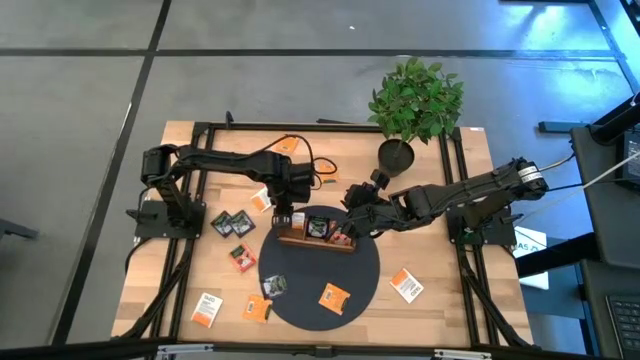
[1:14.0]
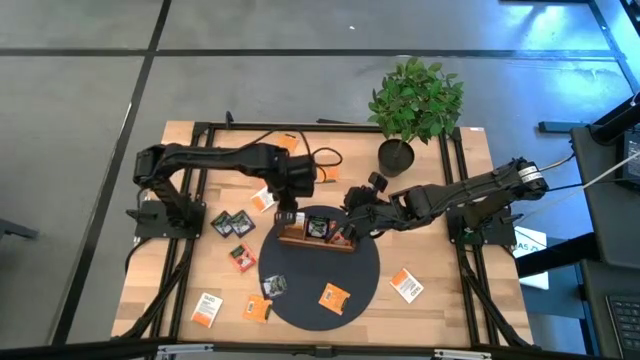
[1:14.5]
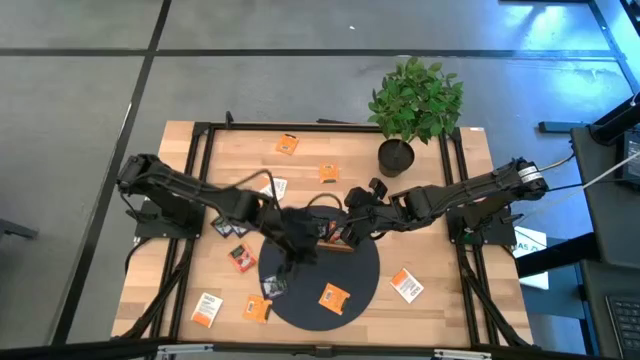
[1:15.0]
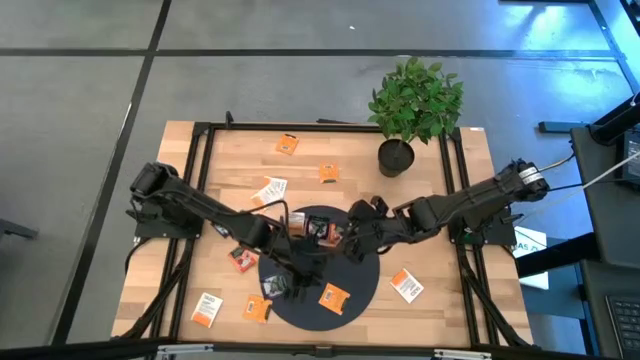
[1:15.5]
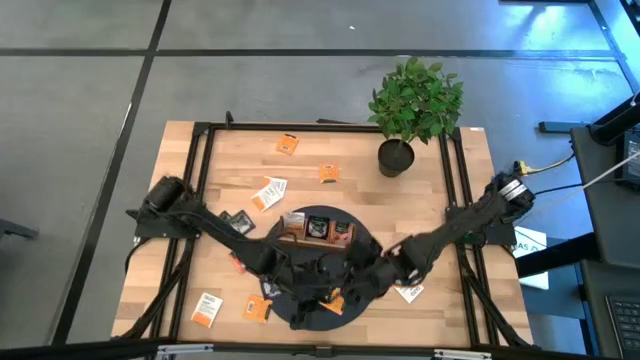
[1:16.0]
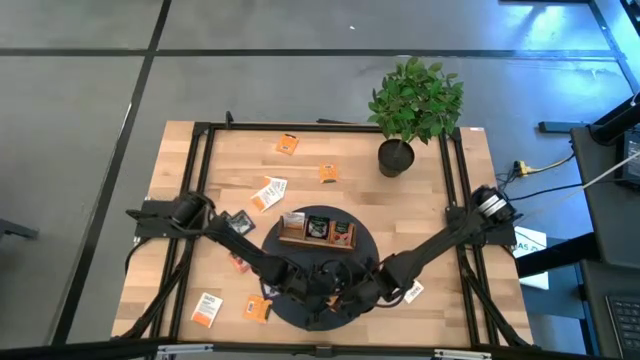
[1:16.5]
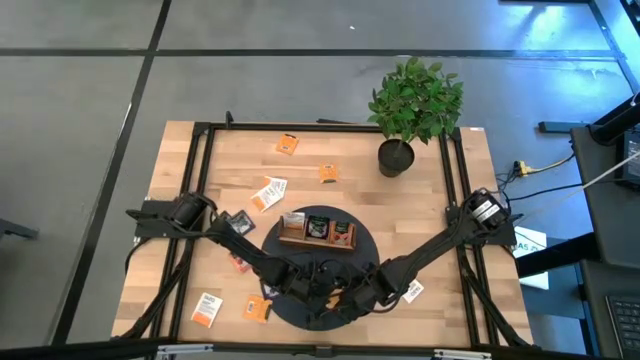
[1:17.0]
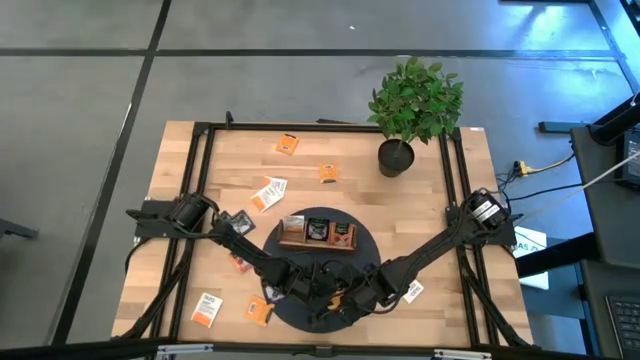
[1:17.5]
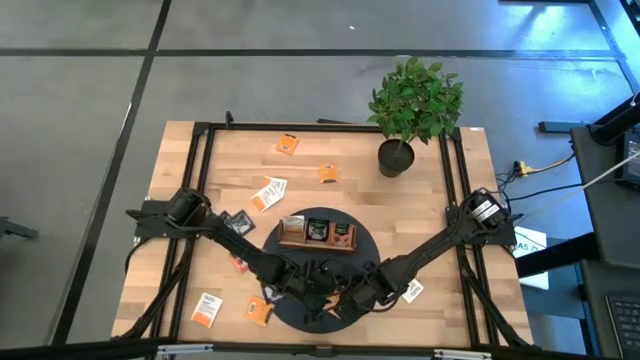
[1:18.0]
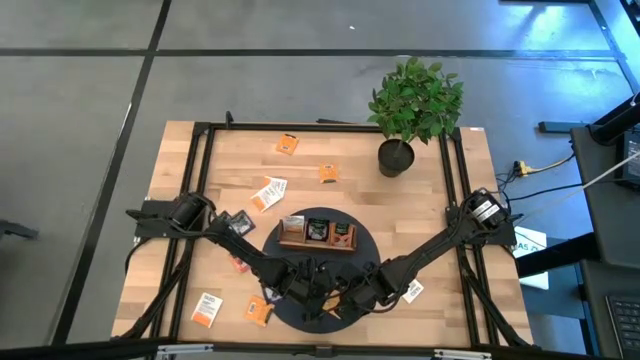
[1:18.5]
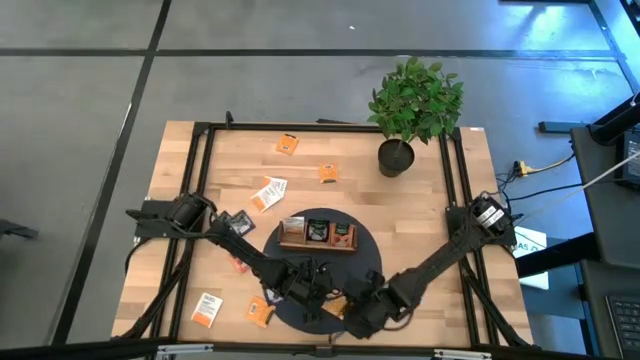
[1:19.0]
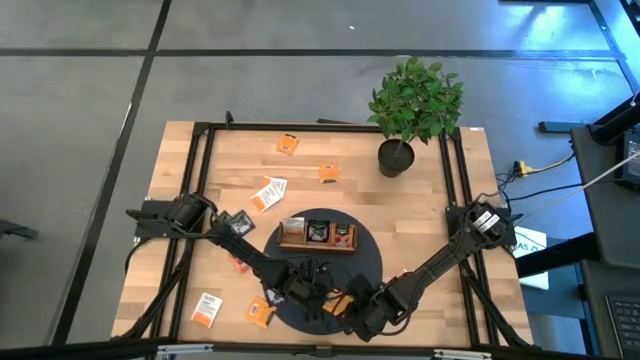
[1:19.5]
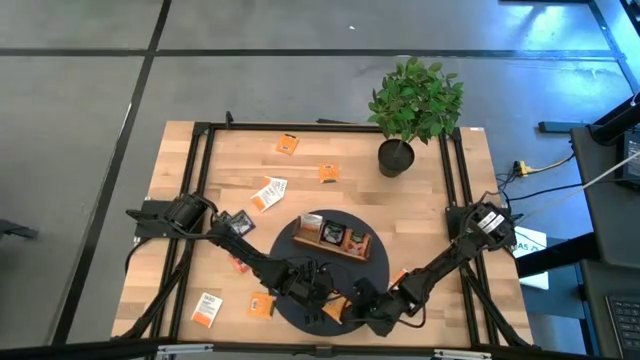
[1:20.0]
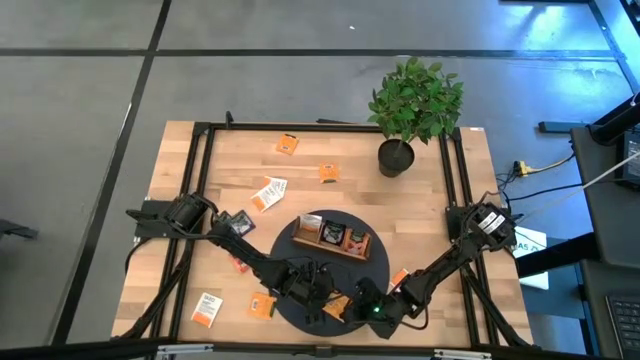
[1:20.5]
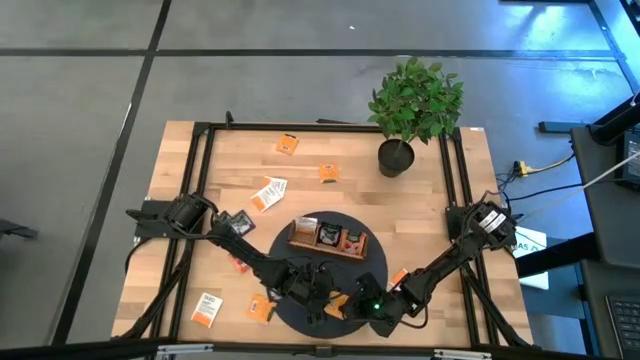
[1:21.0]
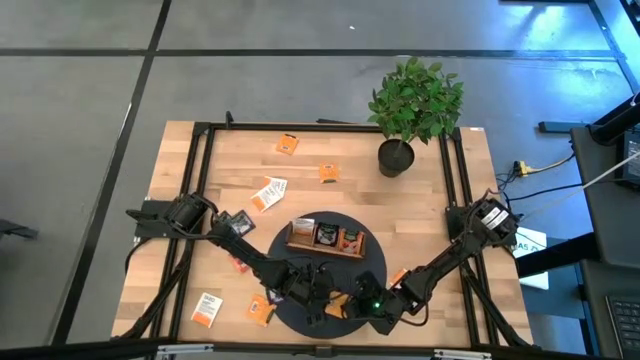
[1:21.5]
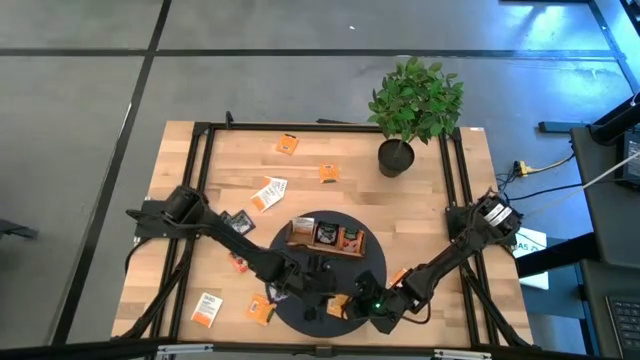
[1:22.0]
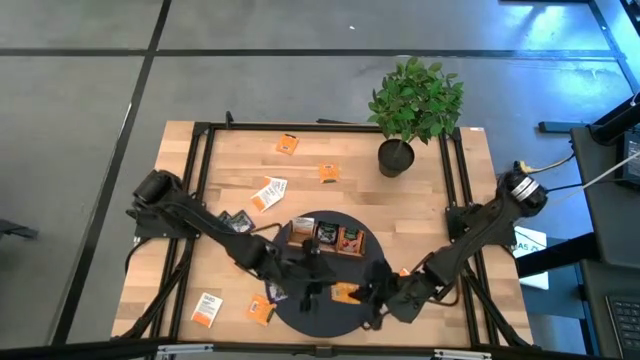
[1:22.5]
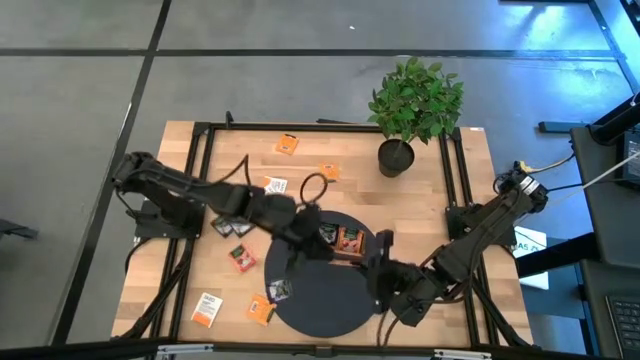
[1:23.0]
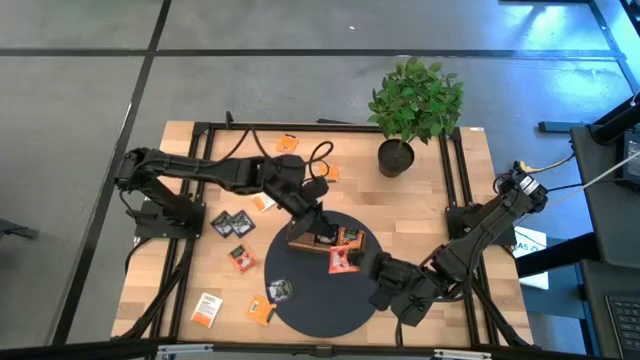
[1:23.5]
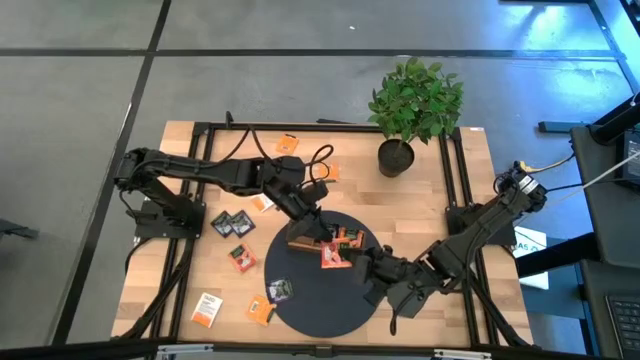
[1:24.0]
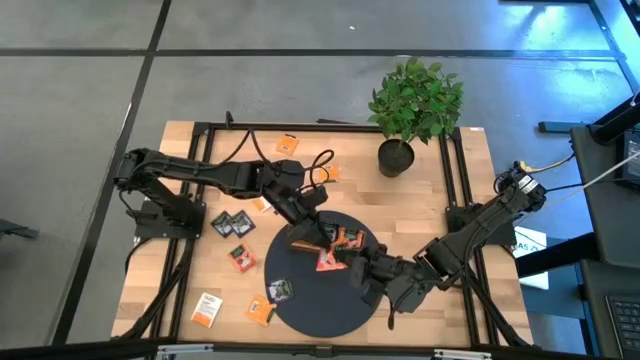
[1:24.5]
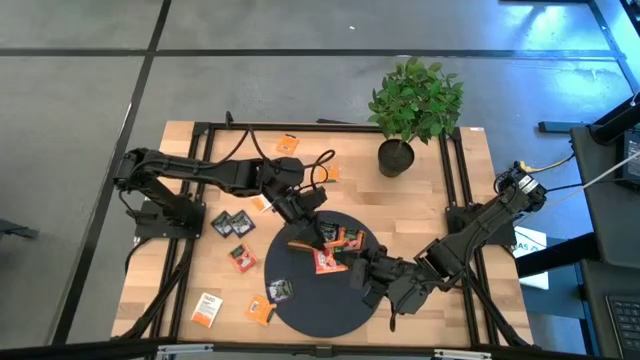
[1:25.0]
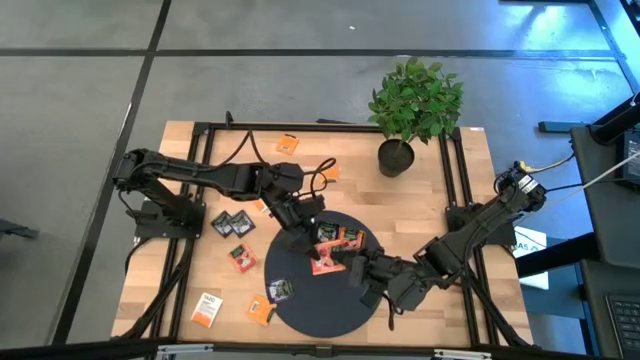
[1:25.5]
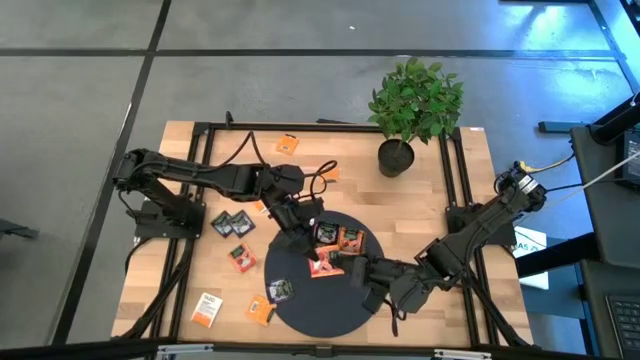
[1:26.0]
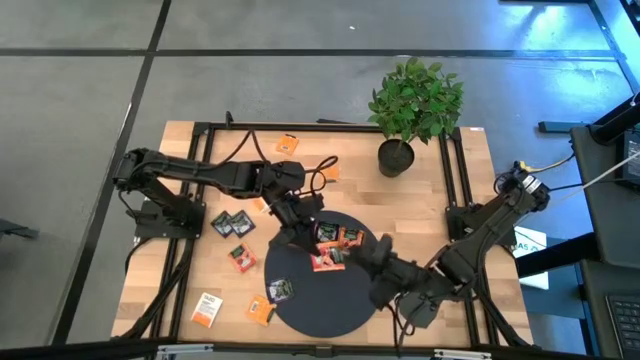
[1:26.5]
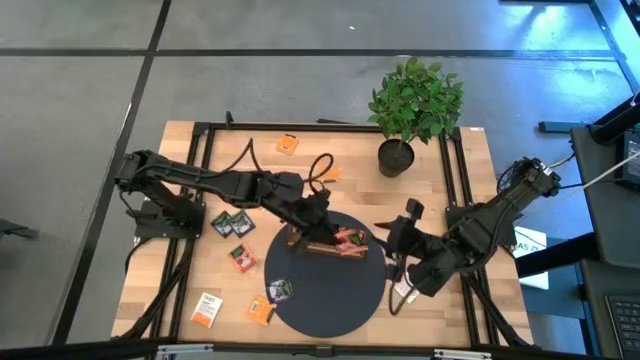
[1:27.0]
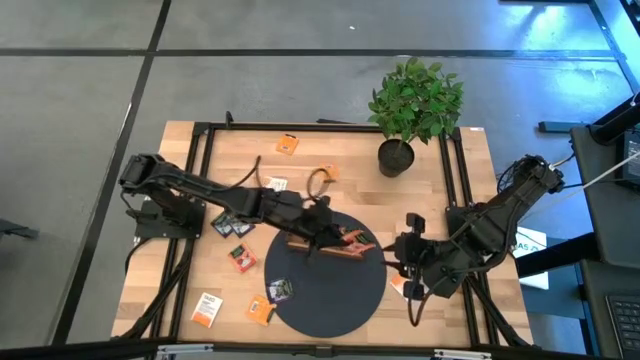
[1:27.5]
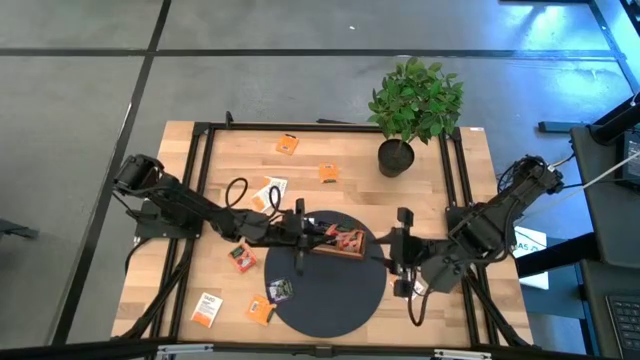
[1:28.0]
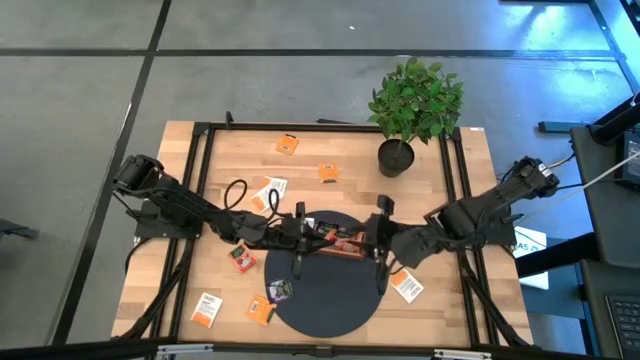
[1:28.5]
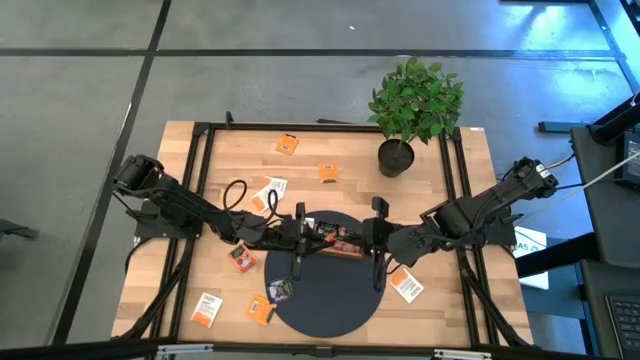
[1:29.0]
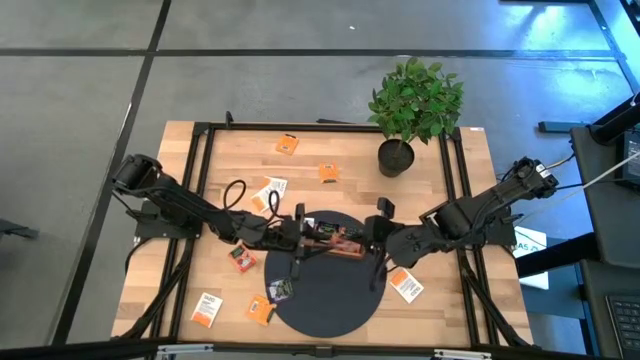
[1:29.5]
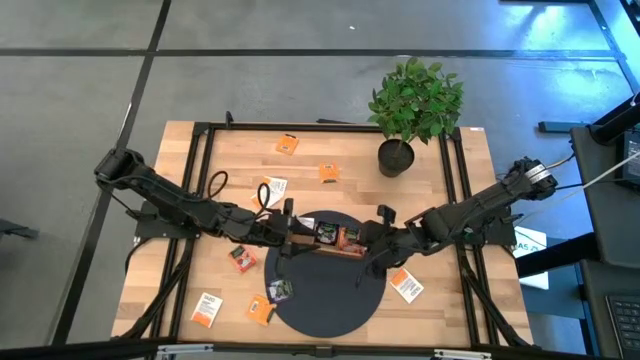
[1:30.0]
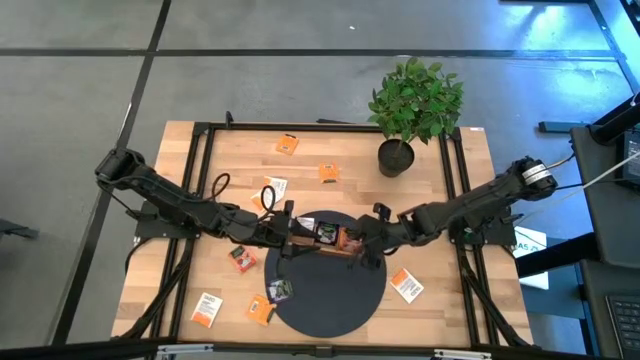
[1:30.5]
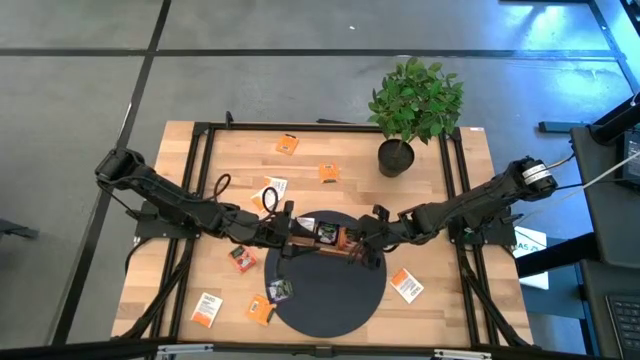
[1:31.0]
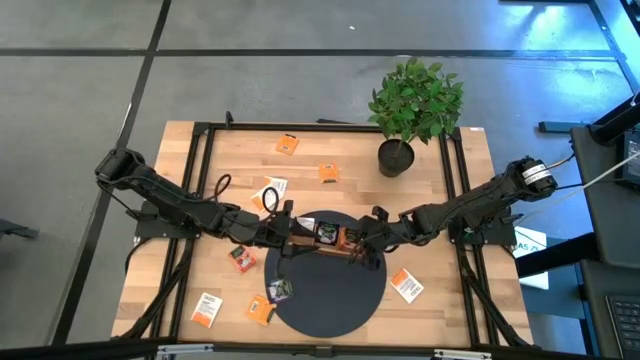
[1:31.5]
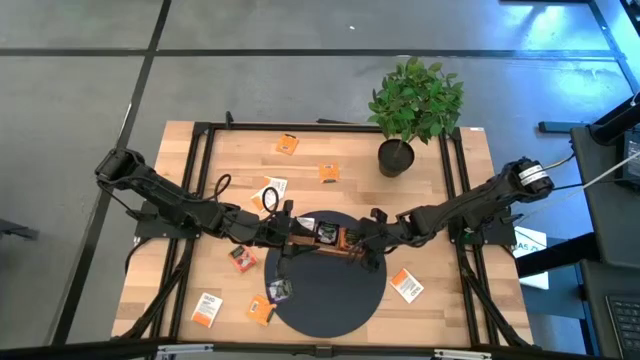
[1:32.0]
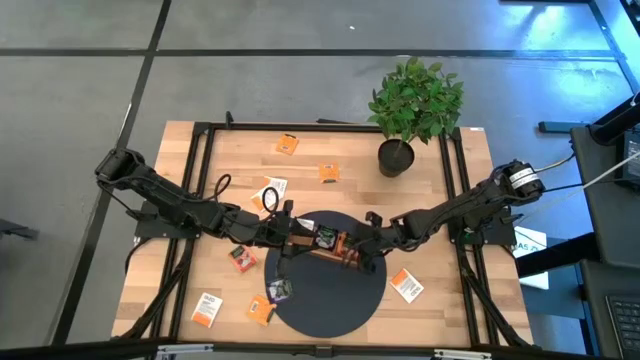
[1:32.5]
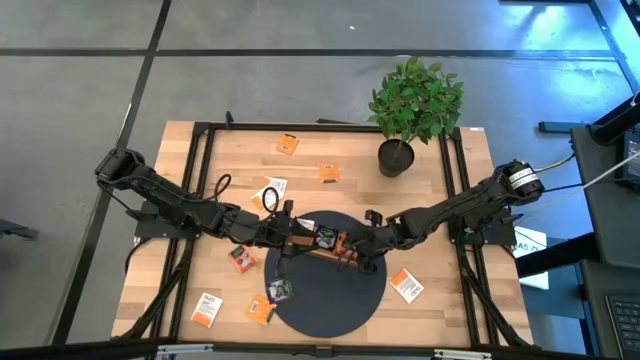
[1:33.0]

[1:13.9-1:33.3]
Task: Pick & Place Tea
Put the orange tea bag into the right section of the wooden organizer

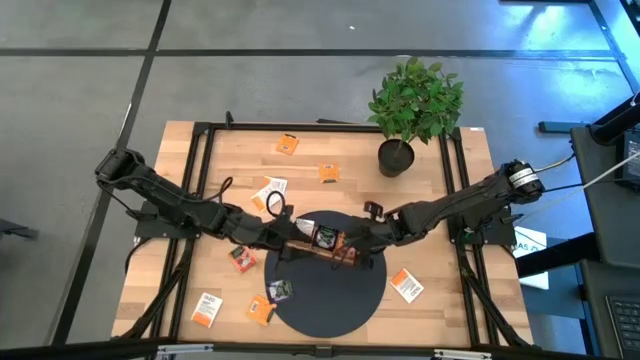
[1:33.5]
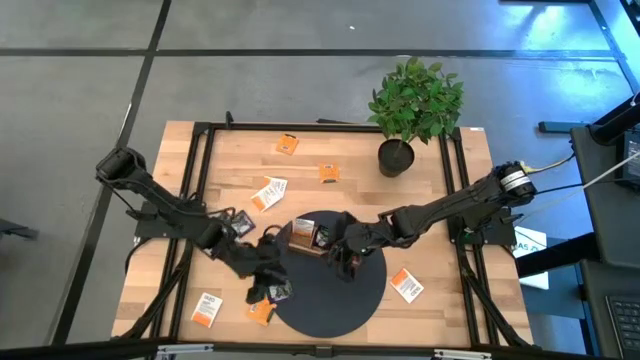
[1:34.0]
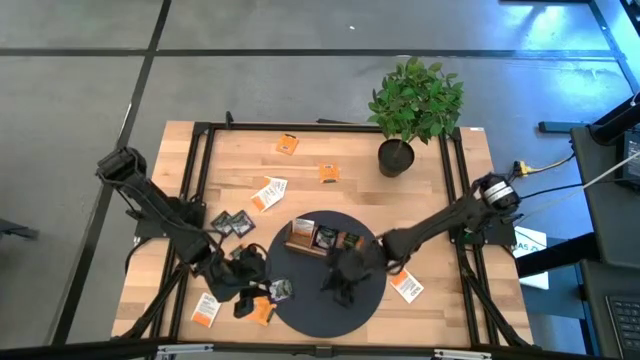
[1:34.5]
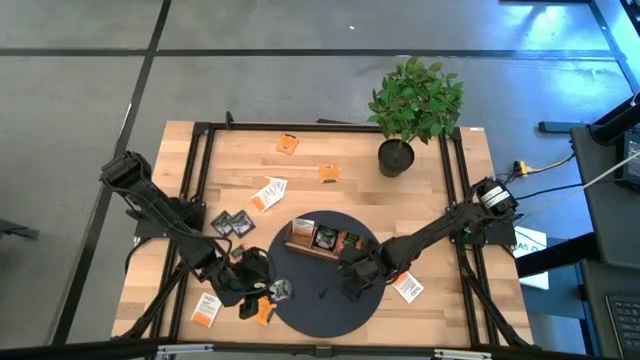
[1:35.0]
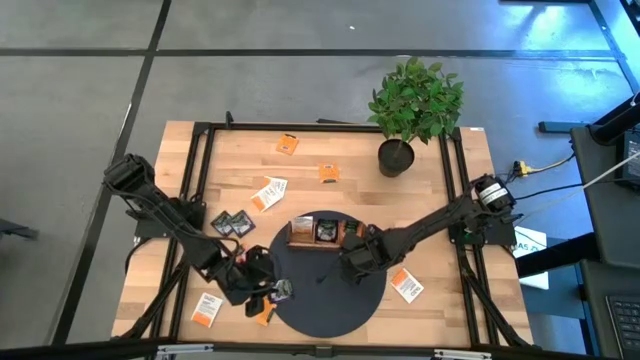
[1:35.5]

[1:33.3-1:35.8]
Adjust the wooden organizer
